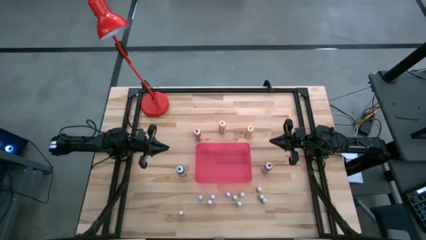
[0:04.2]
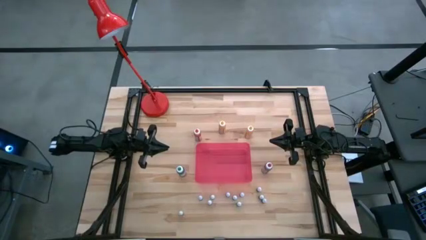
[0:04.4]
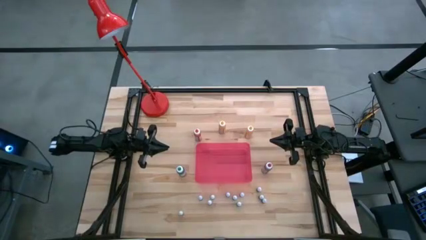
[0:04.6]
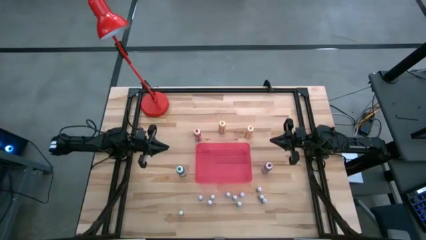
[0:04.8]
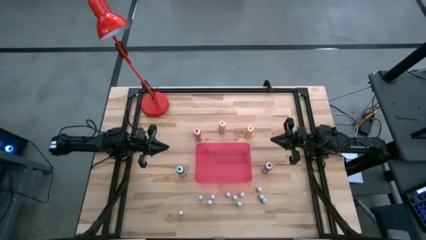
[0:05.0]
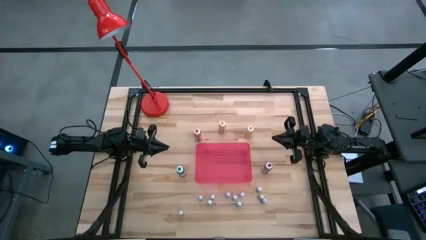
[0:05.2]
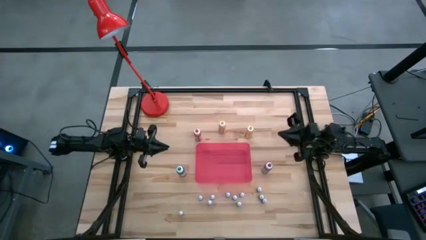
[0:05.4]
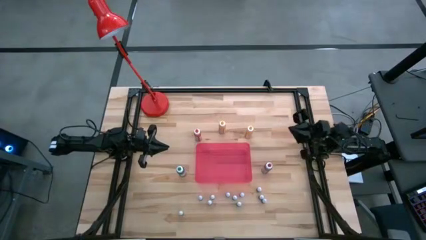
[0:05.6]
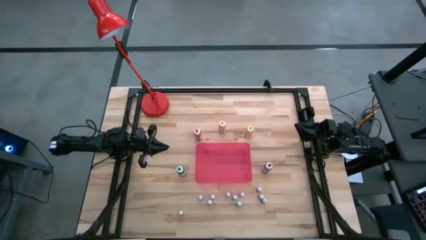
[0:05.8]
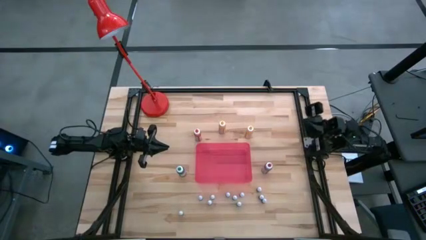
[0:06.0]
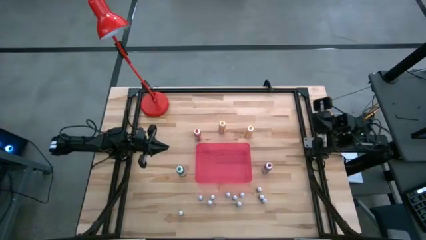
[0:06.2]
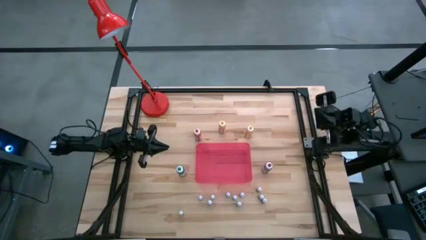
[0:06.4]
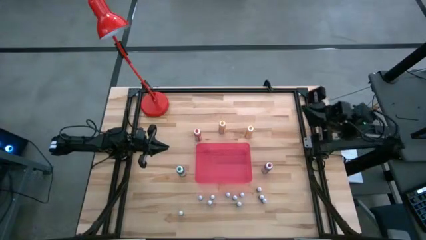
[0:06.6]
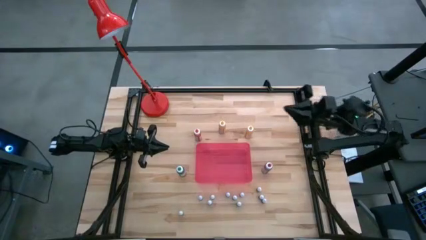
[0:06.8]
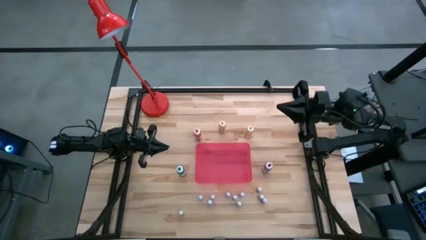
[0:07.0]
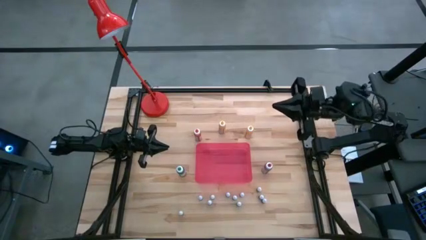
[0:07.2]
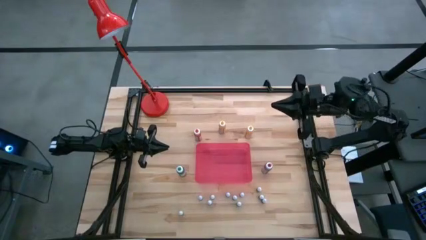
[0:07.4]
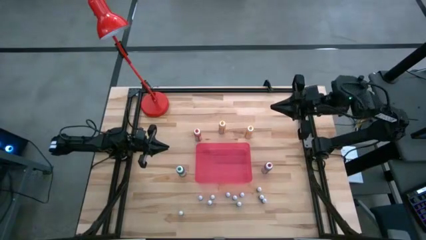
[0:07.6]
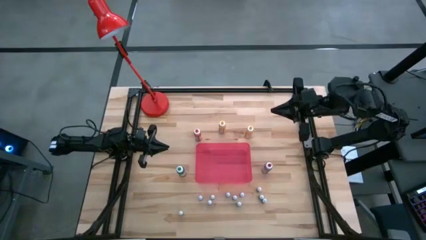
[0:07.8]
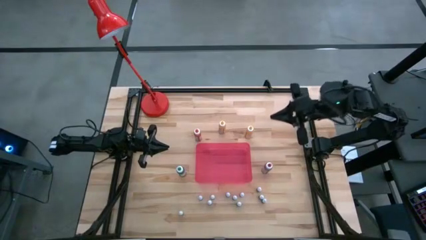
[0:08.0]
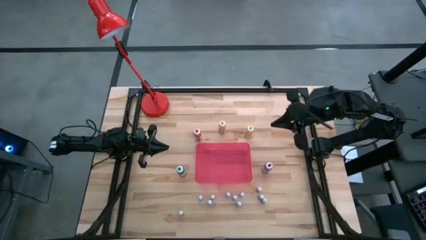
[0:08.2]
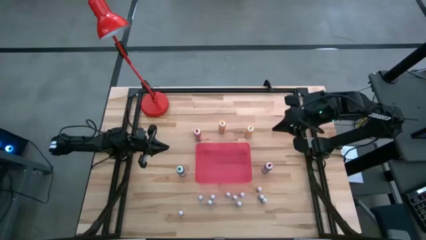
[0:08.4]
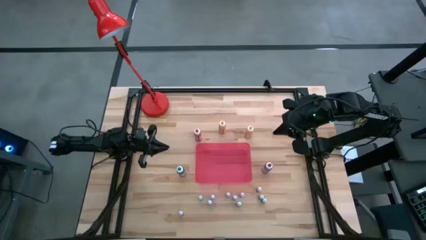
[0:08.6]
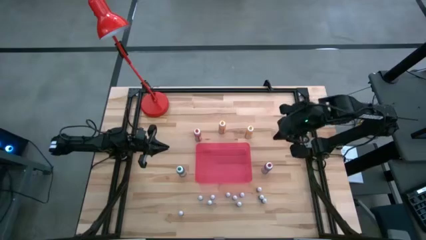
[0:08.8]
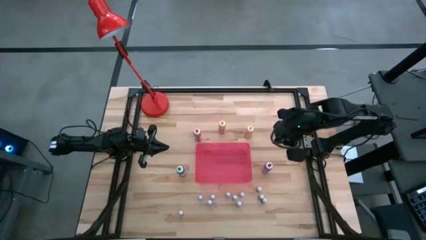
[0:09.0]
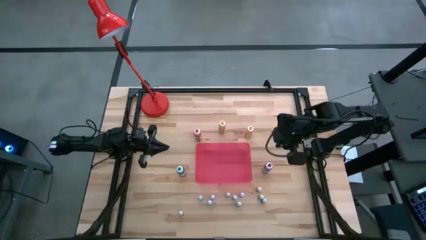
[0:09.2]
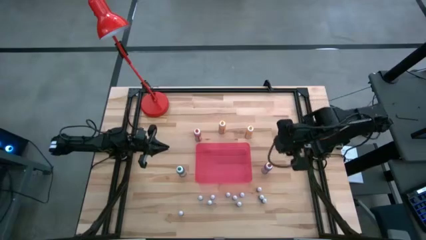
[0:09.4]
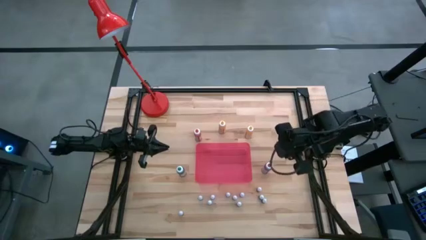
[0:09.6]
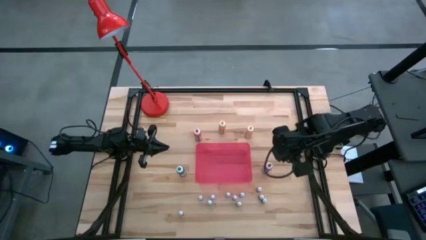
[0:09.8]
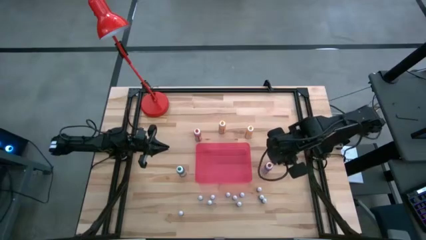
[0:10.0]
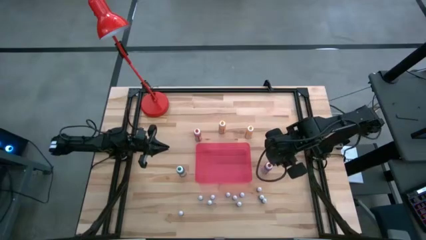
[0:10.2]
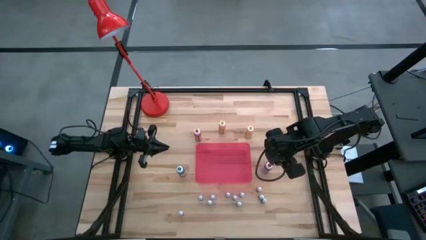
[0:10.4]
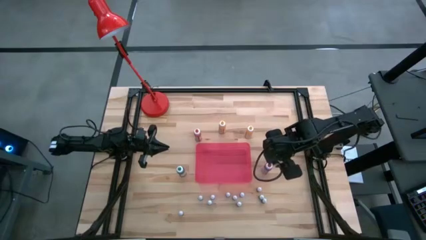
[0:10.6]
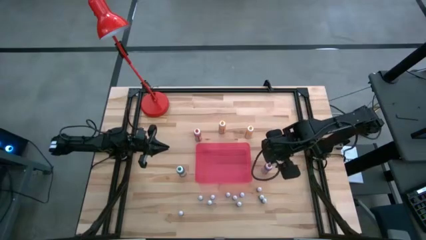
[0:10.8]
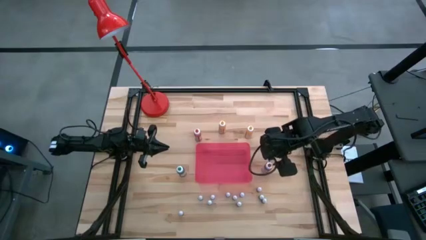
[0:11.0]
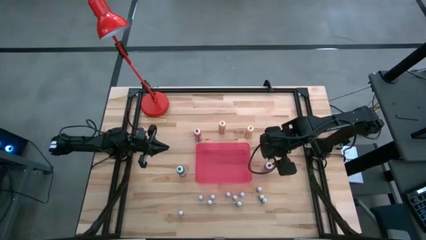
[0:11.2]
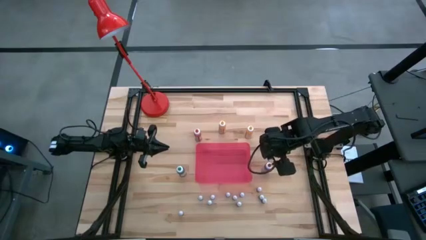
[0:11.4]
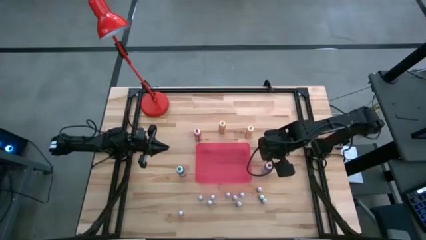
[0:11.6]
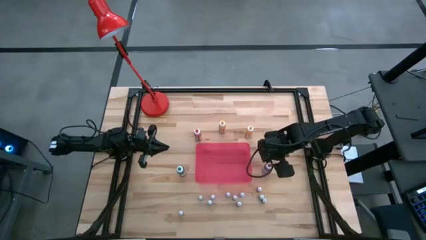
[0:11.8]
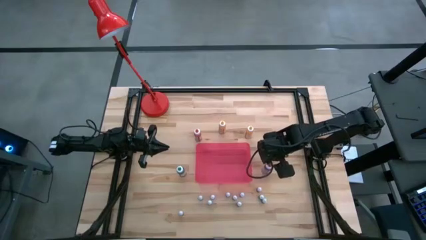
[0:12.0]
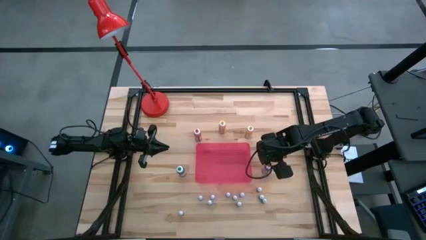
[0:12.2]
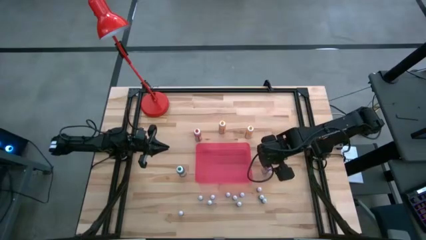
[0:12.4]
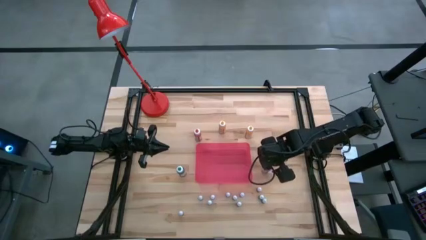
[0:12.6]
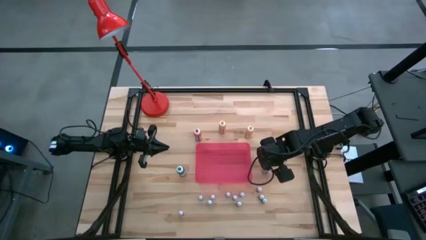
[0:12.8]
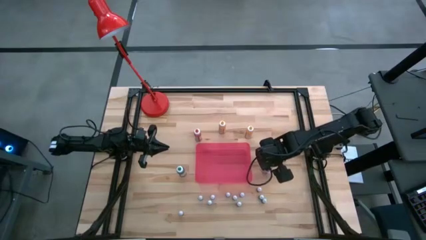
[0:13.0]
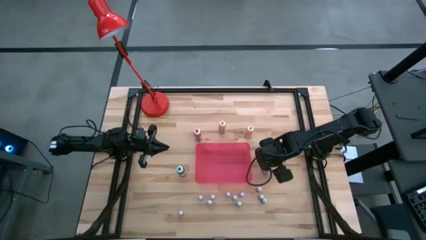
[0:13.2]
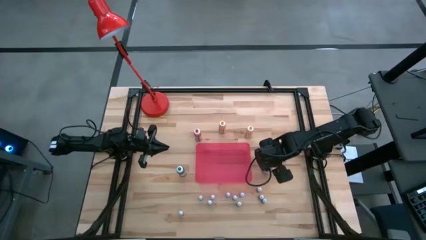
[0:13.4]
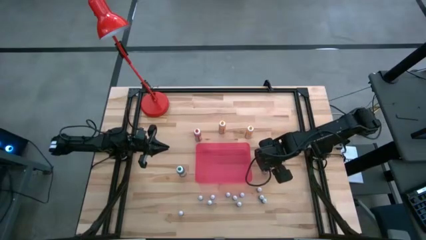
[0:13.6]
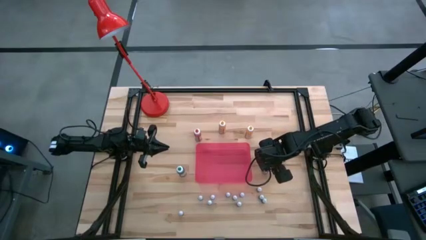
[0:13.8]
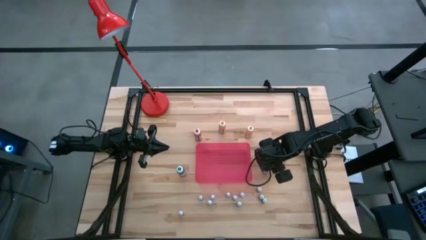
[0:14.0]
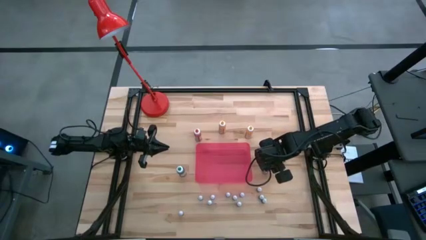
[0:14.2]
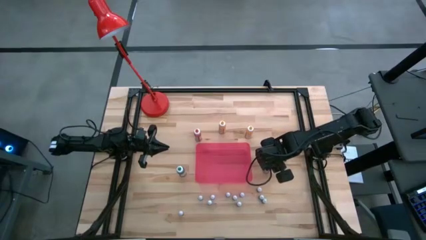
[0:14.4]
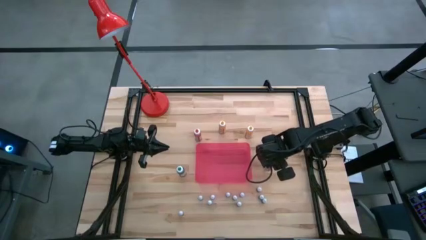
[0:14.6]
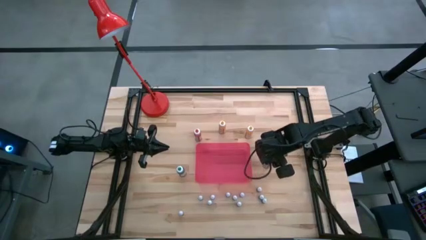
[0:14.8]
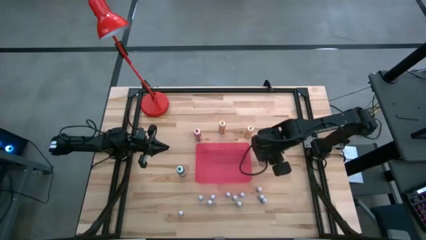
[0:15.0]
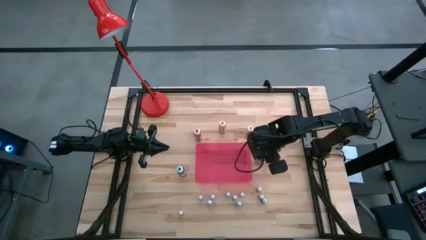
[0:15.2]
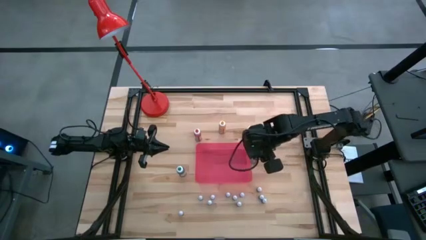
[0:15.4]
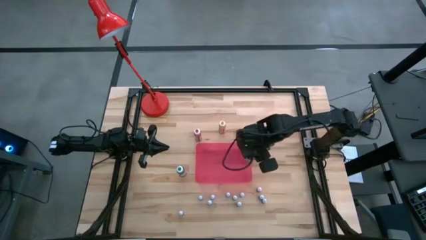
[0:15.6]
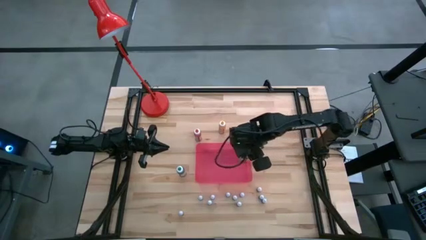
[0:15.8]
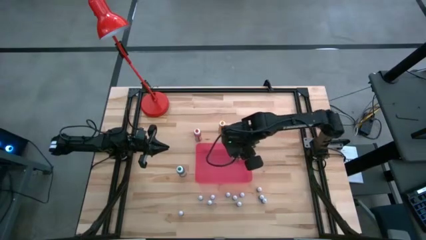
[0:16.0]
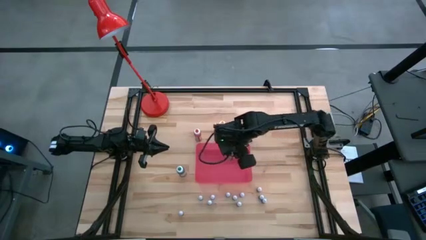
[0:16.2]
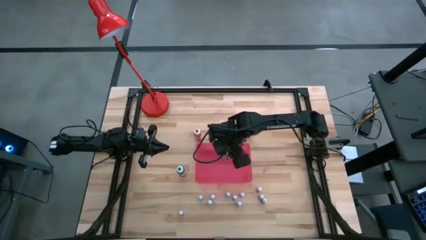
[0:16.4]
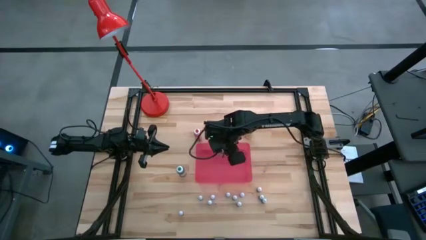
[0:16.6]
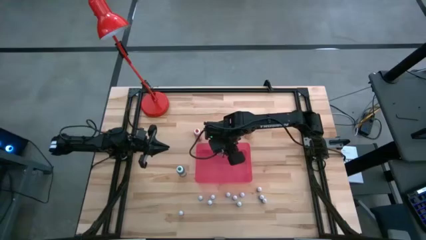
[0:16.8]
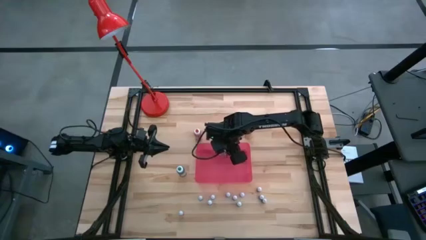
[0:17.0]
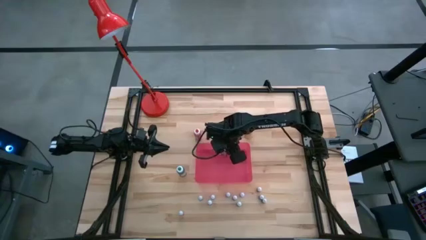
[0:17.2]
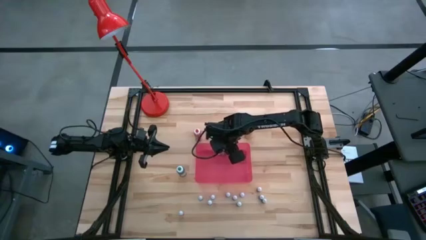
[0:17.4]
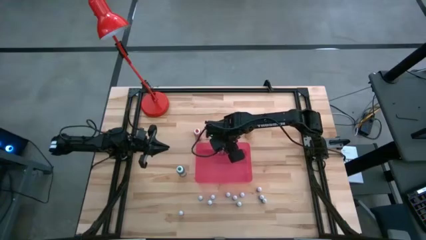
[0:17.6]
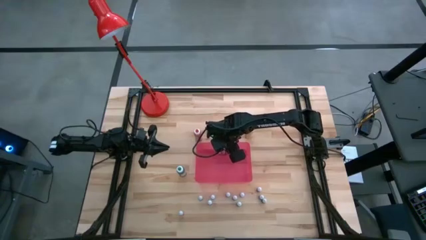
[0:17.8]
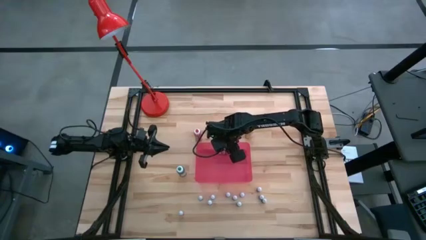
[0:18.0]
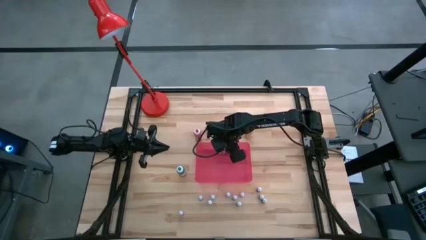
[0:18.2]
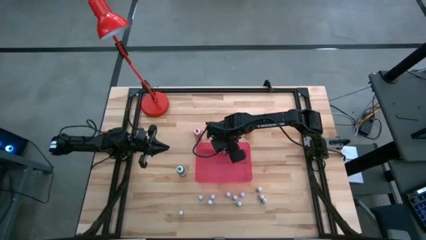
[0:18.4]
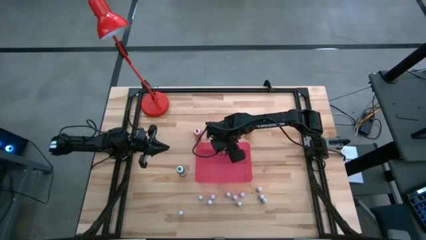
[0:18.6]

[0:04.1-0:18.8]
Task: Pick & Place food coloring
Put the large red food coloring bottle into the container
